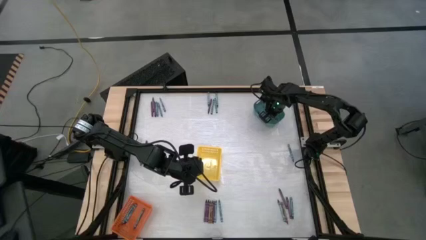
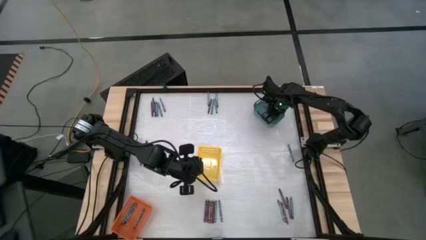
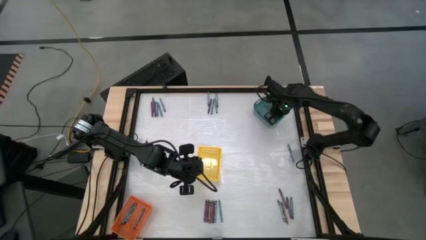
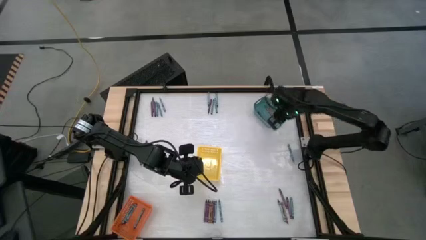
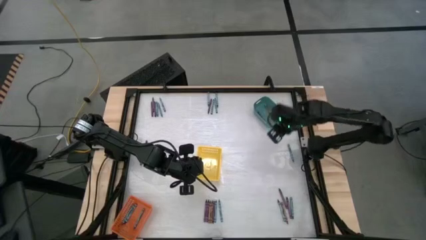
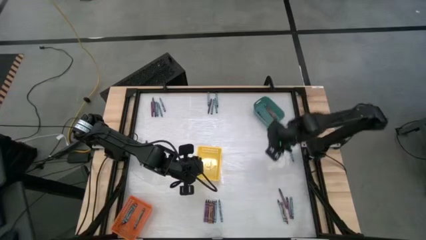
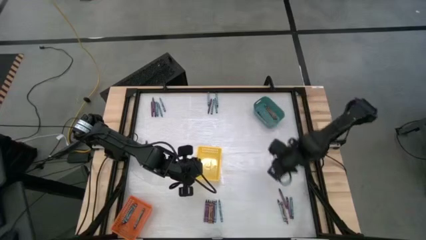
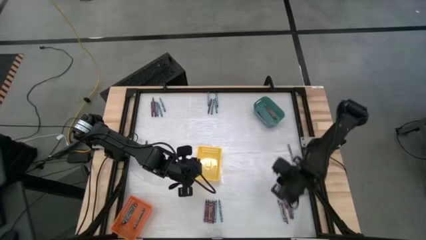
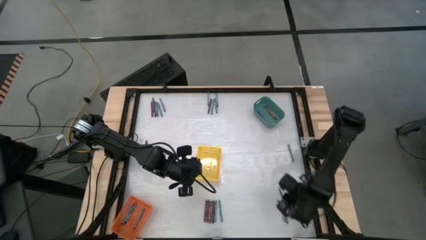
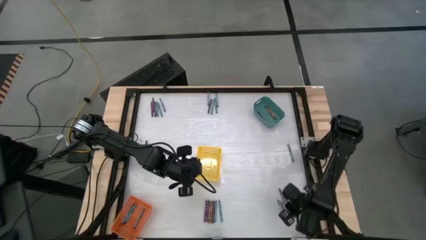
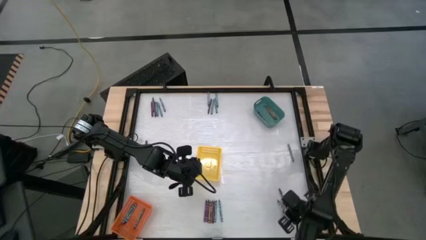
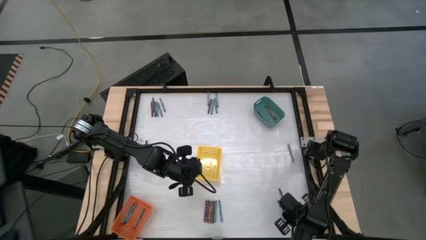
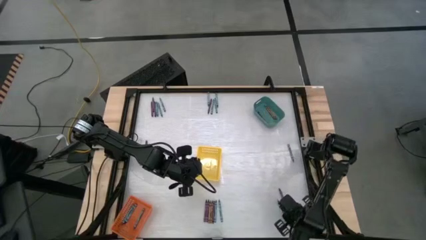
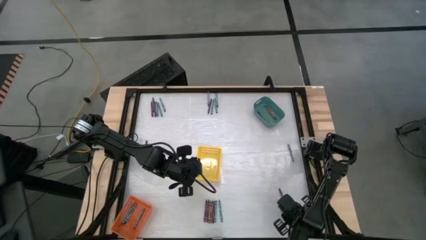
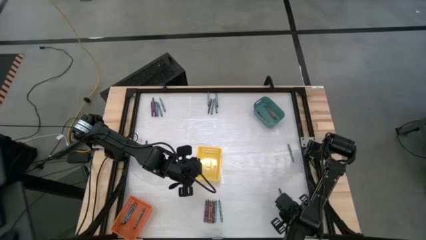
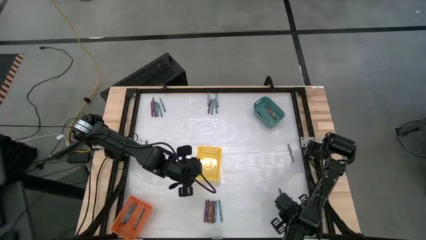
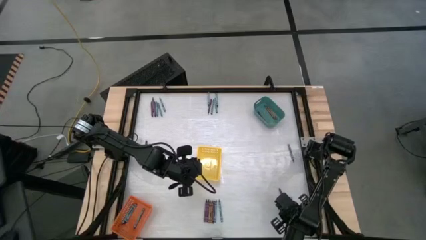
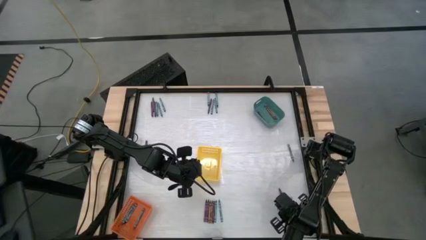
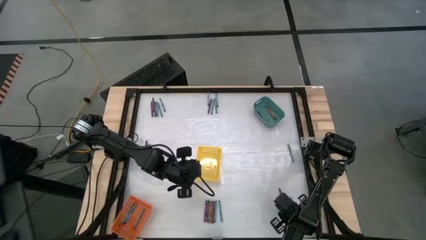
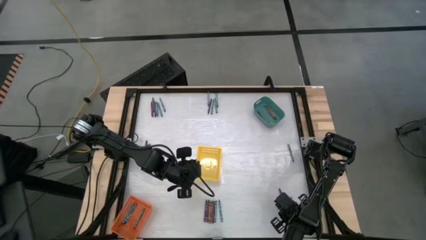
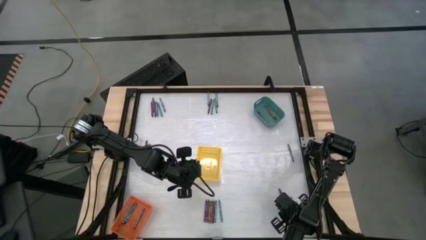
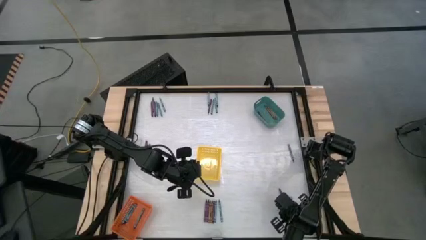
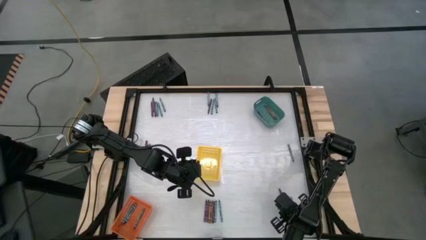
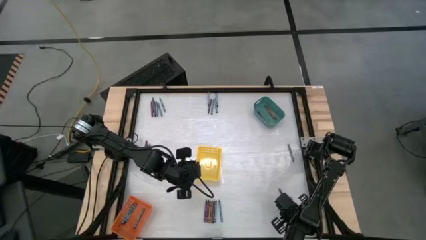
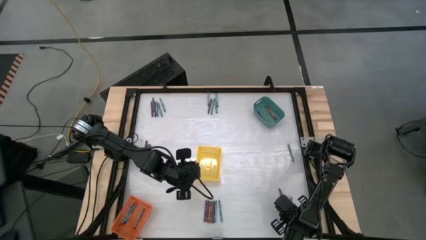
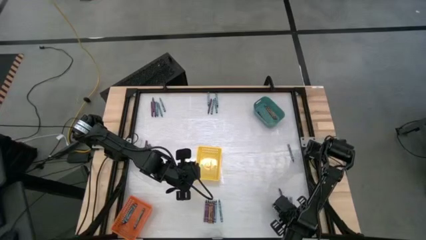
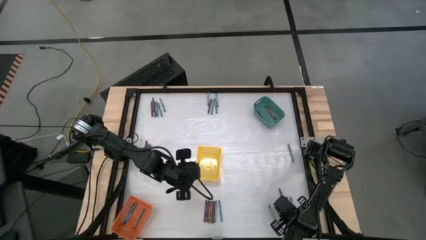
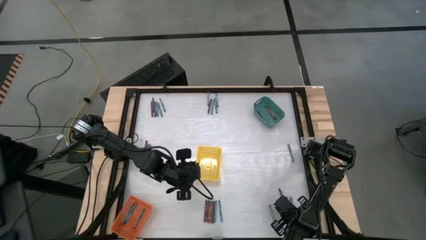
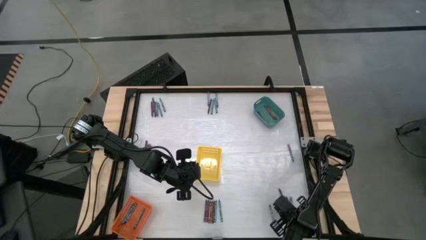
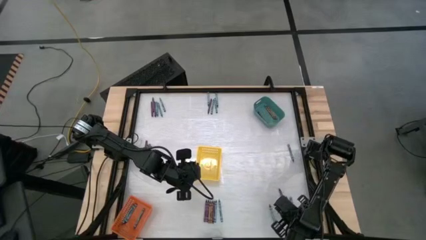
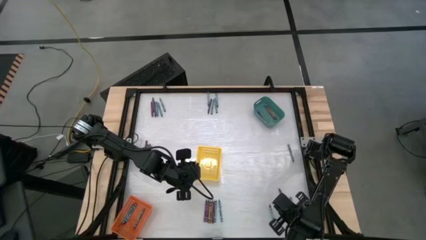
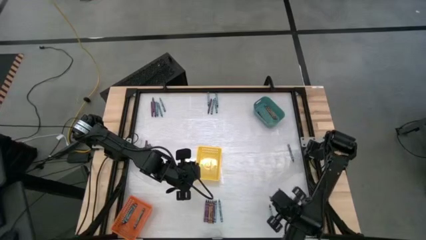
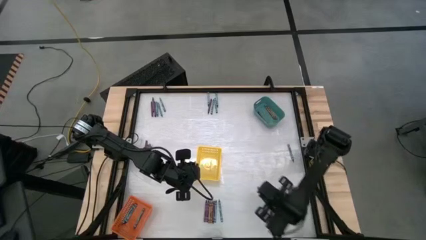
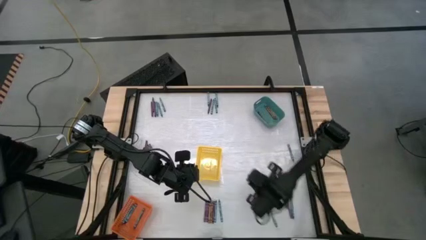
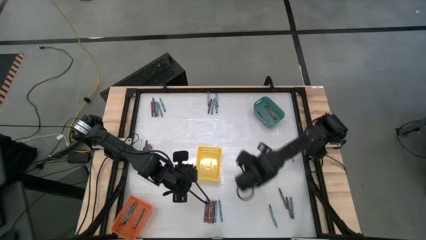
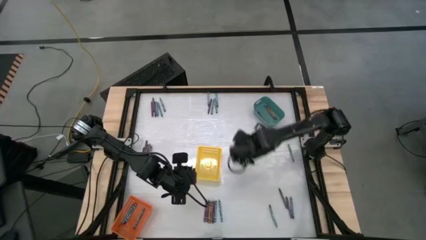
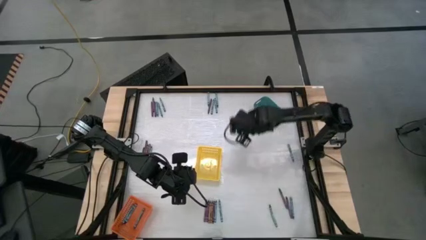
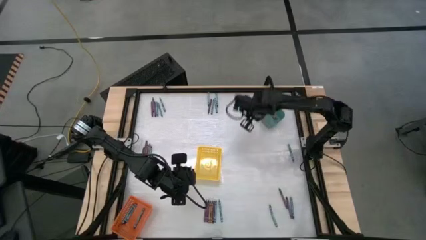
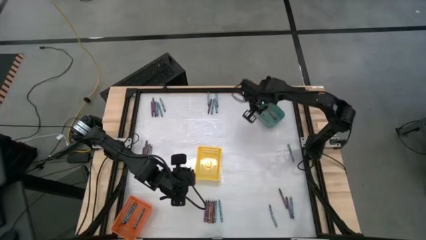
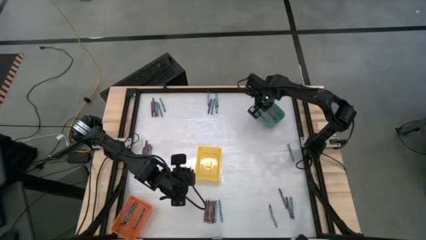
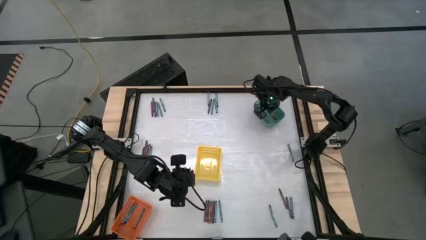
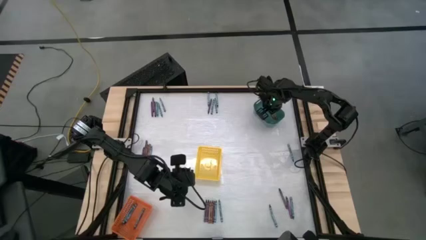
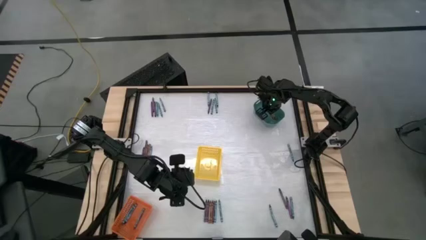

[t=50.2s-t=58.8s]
Task: Sort crayons
Put the brown crayon into the green bin

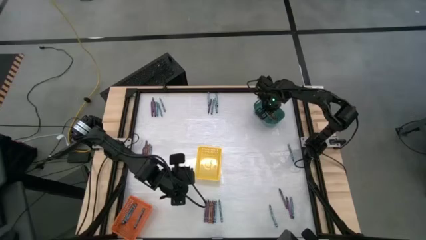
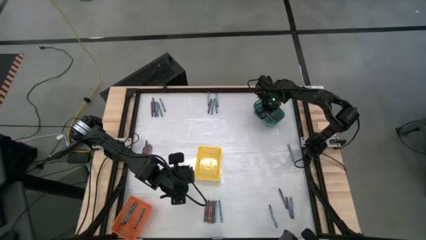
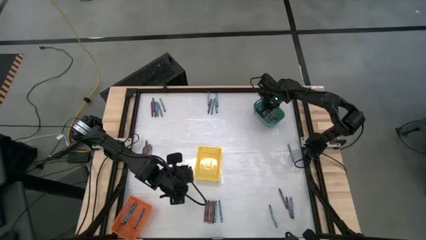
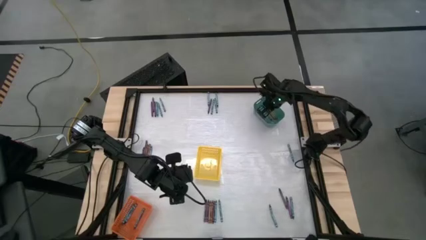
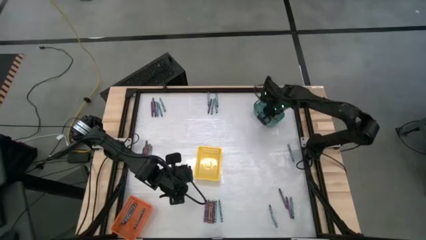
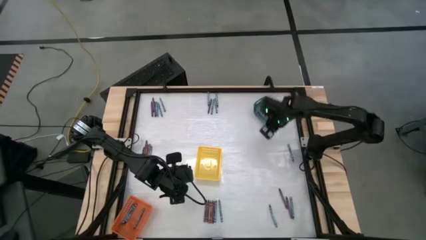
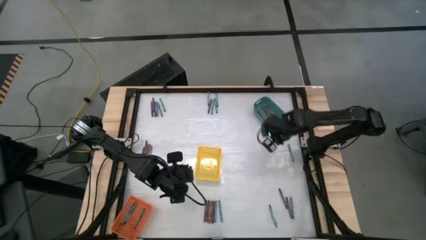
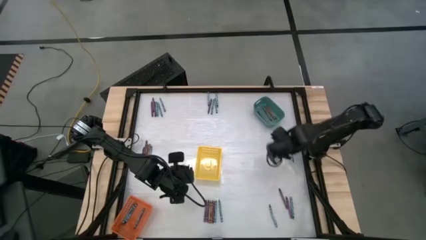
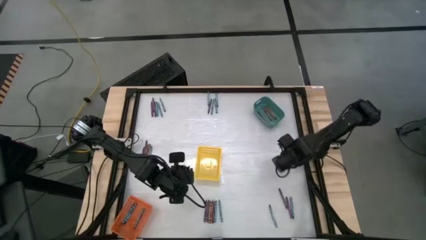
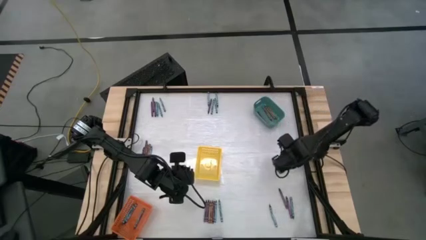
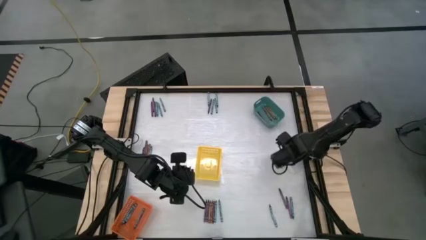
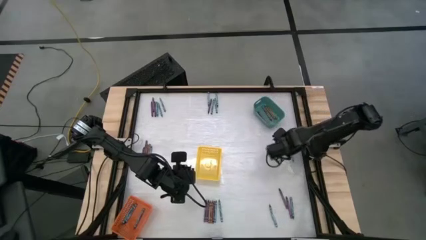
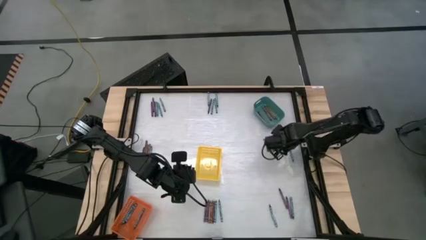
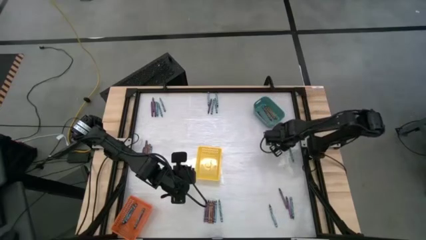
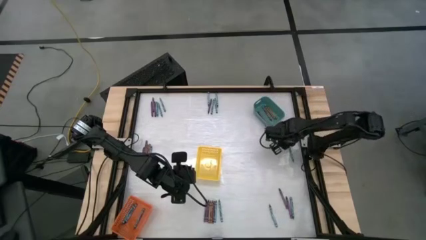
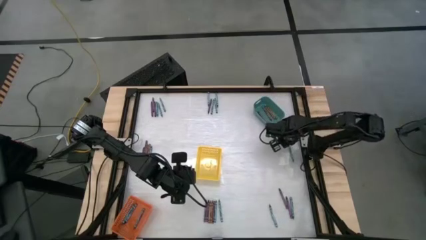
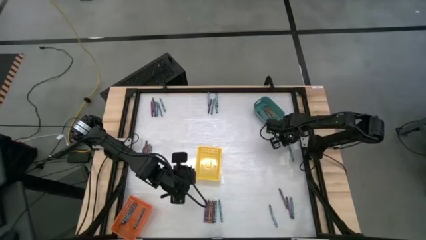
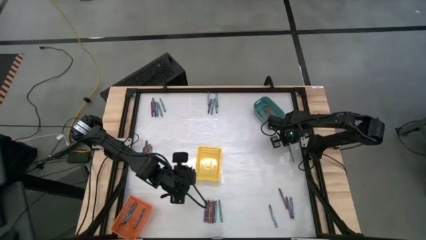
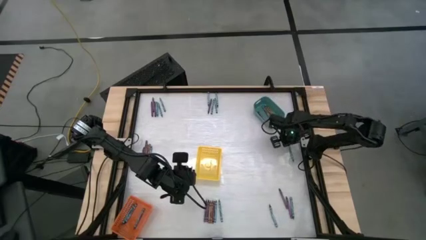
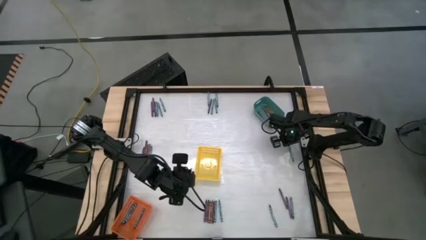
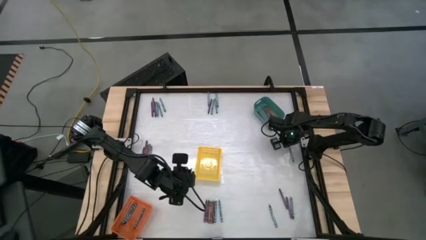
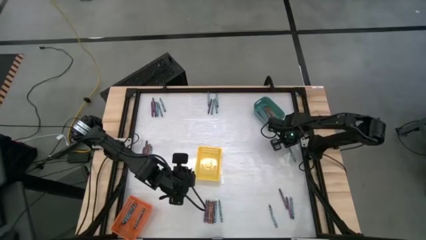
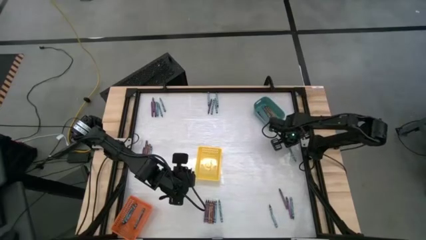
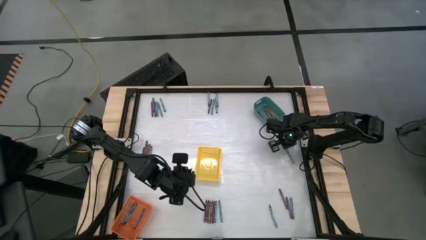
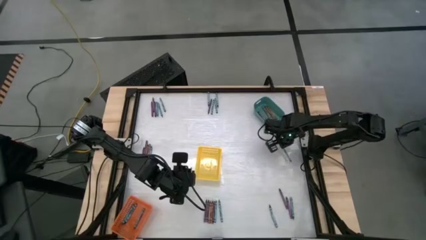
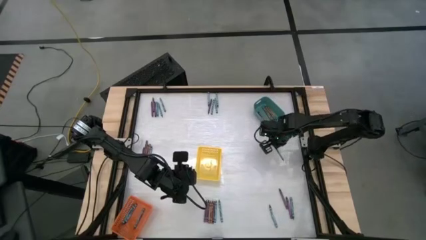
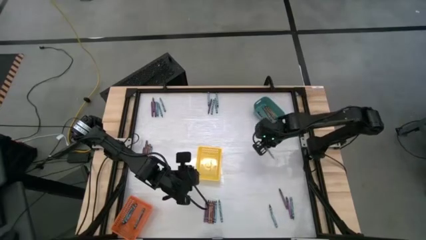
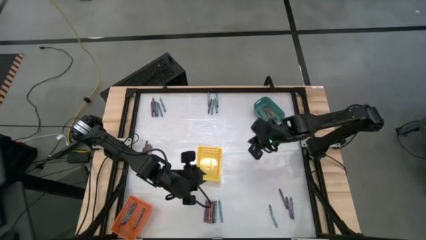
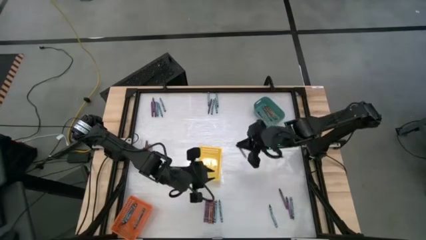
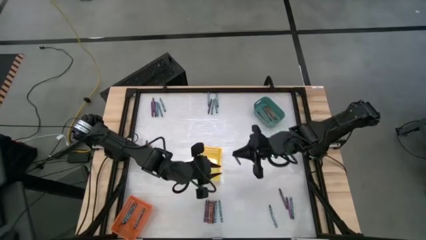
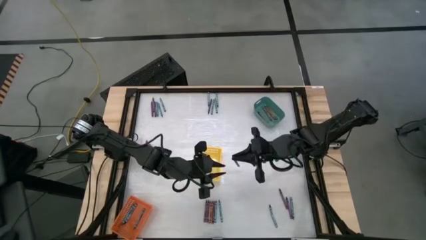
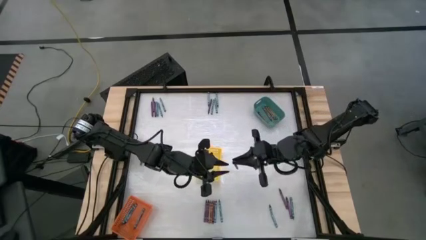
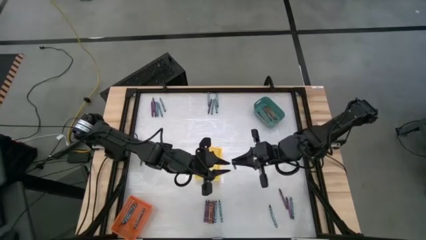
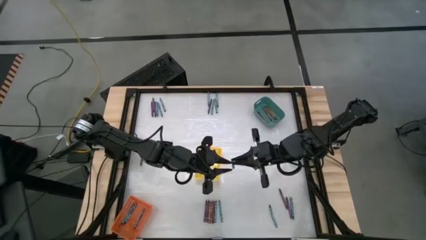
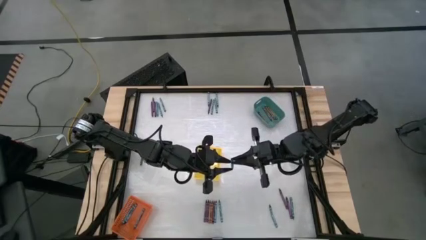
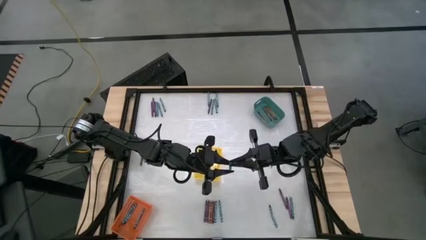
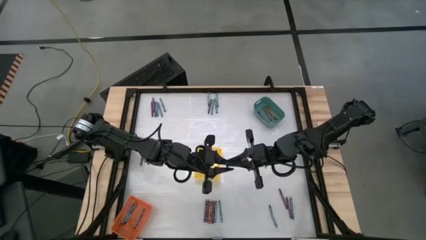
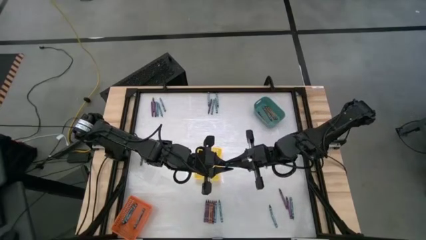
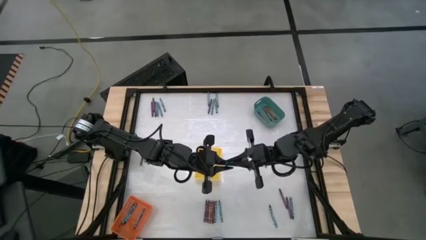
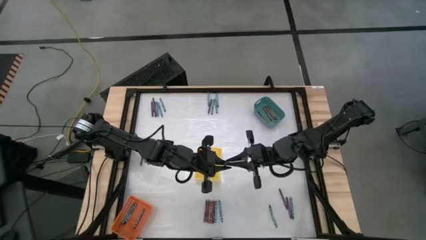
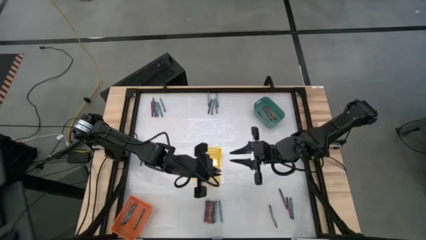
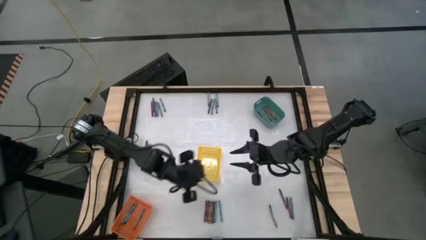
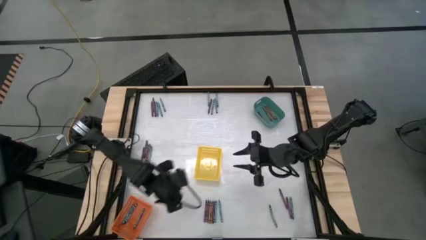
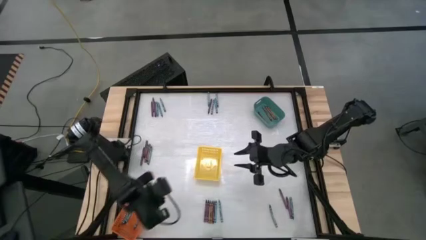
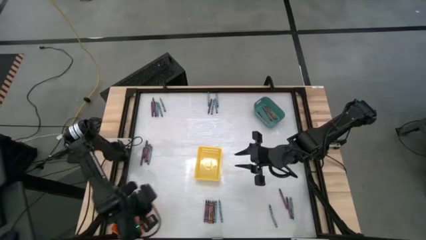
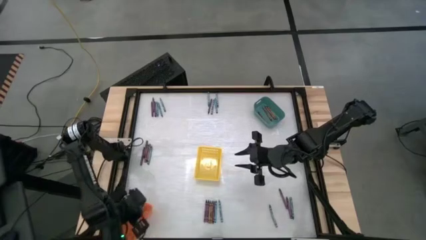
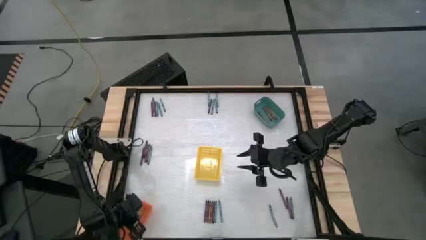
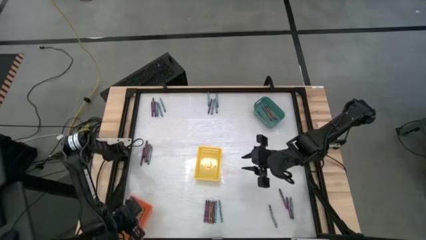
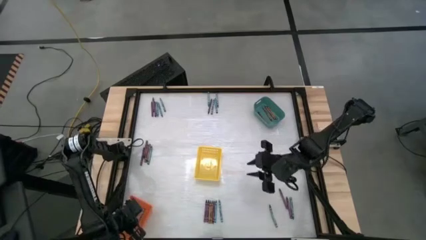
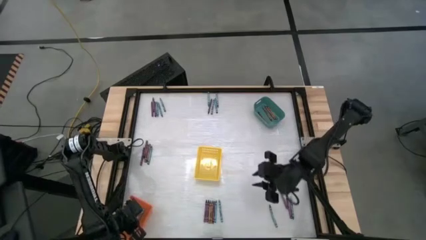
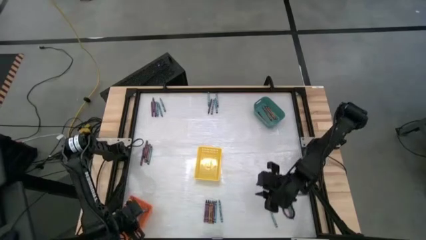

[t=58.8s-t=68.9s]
Put the light blue crayon into the orange basket
